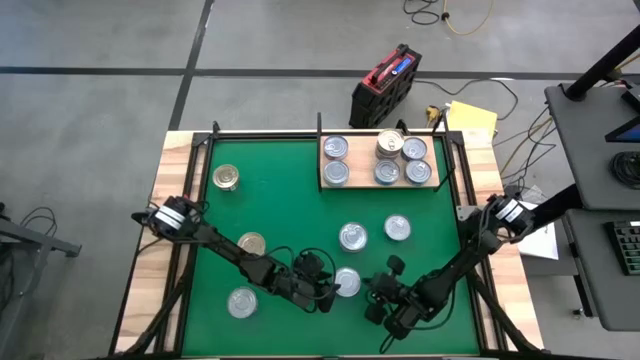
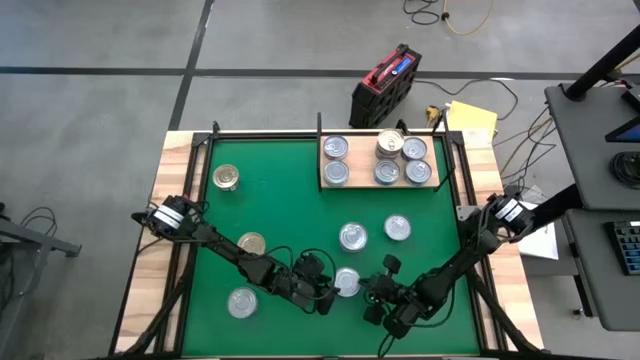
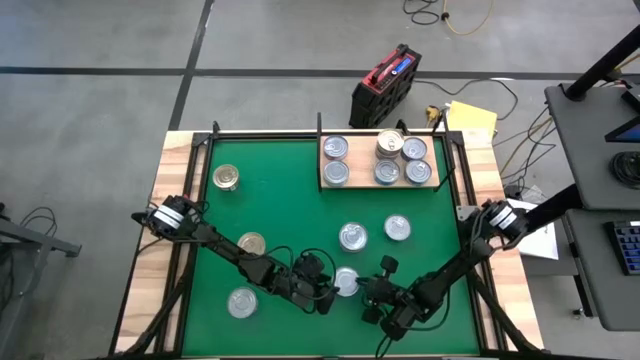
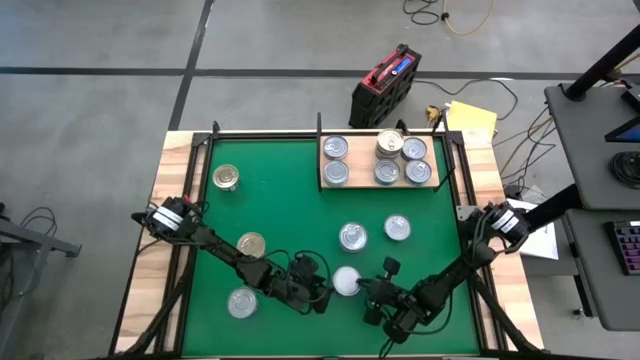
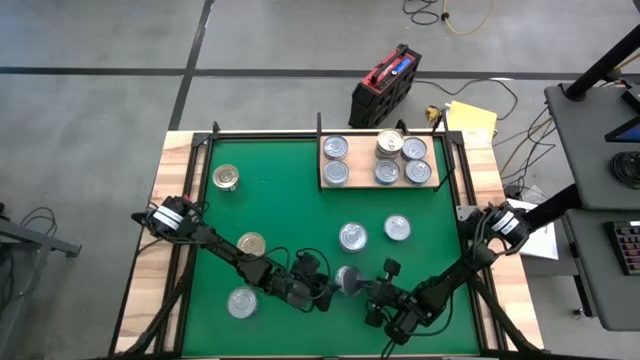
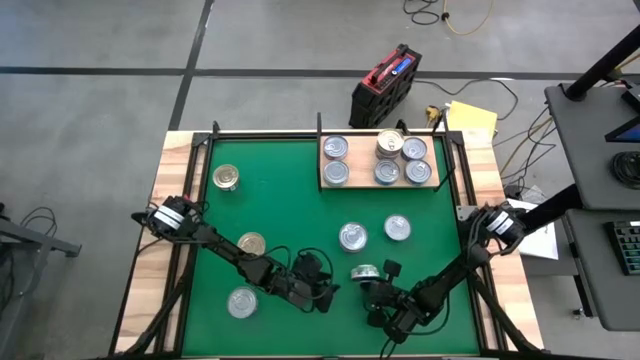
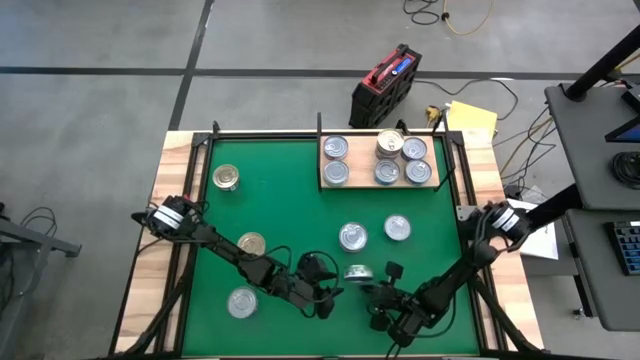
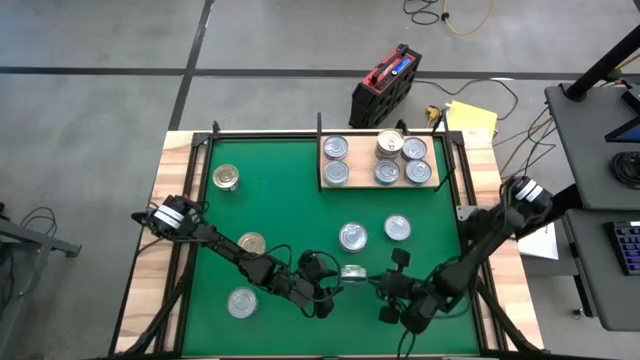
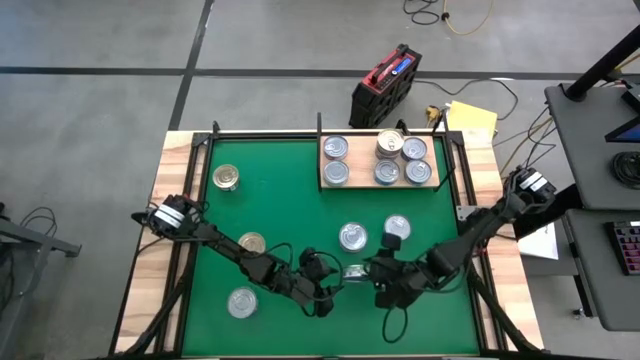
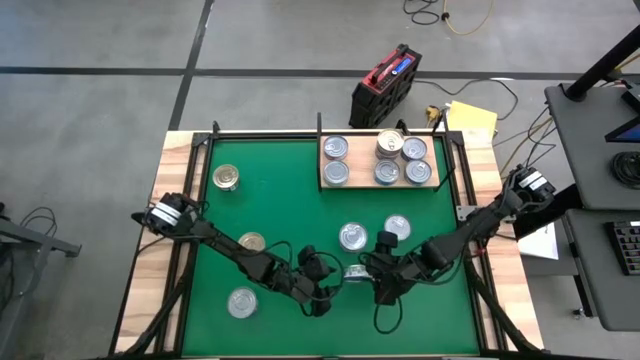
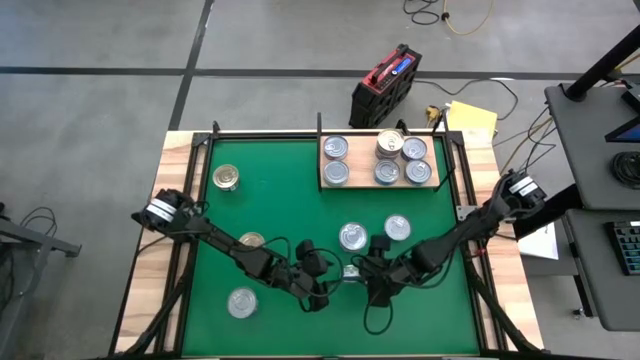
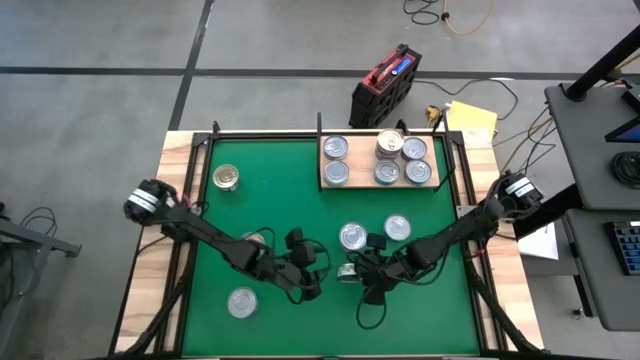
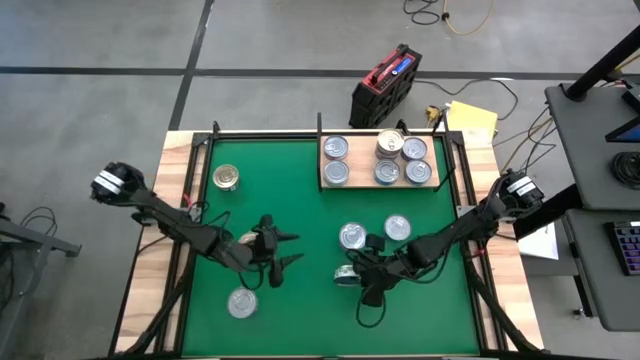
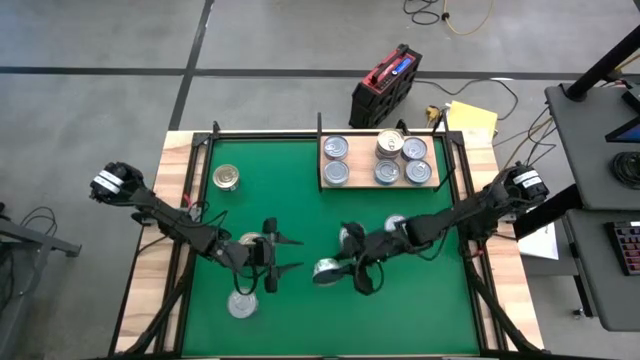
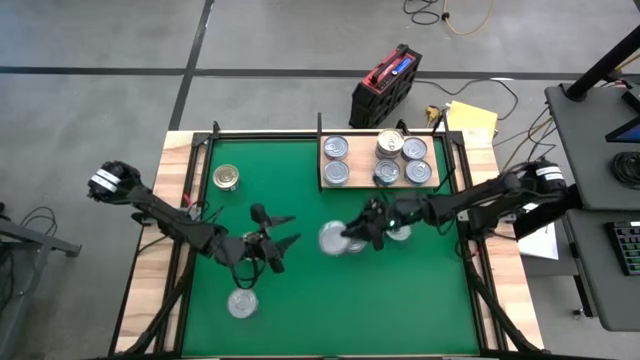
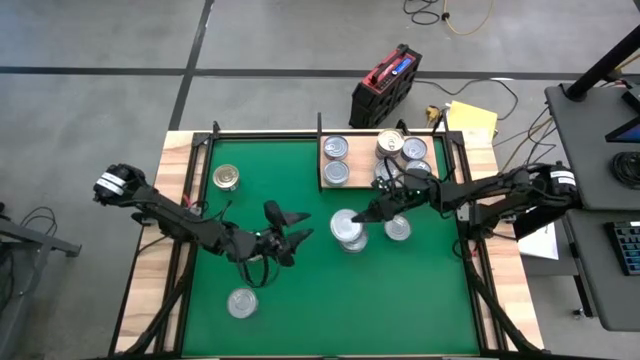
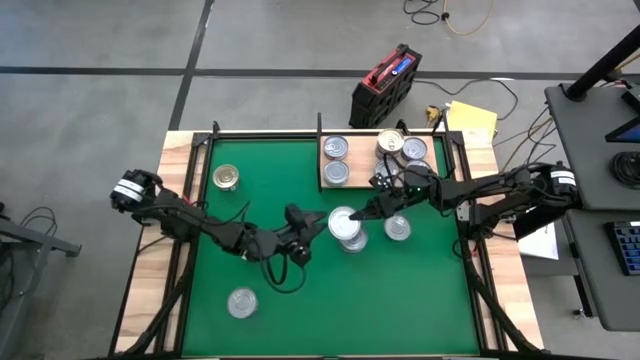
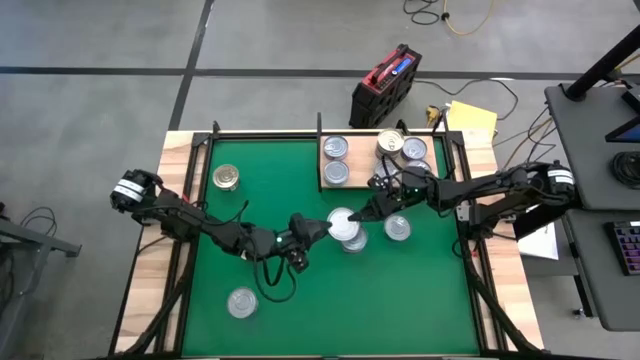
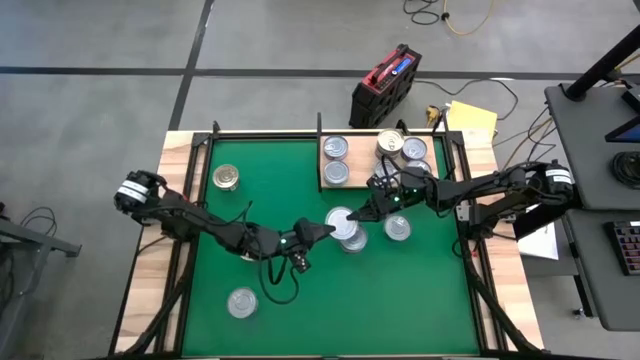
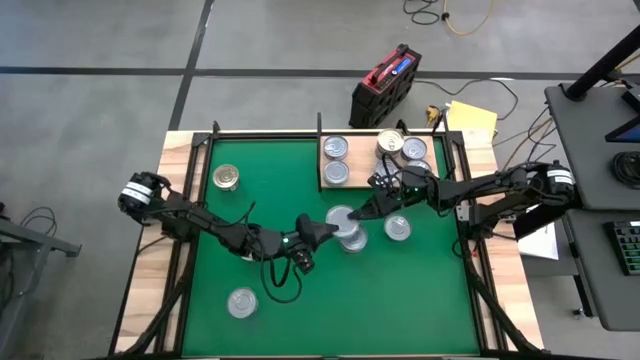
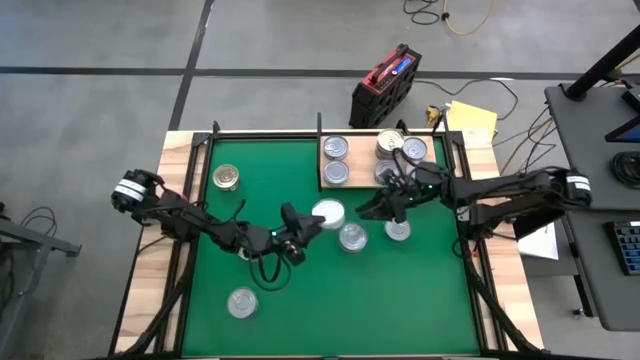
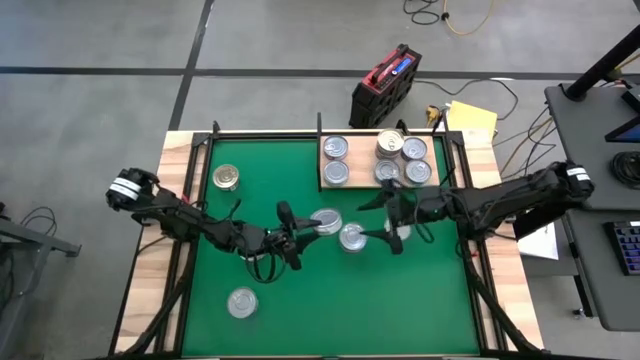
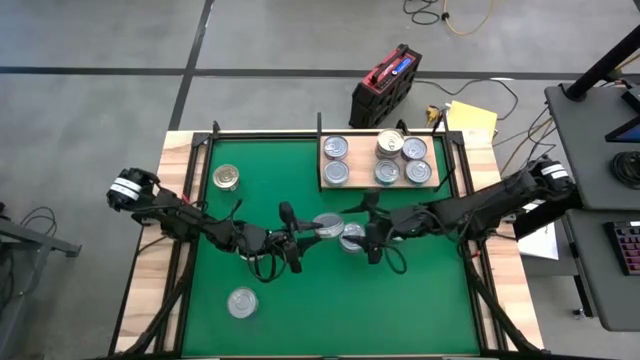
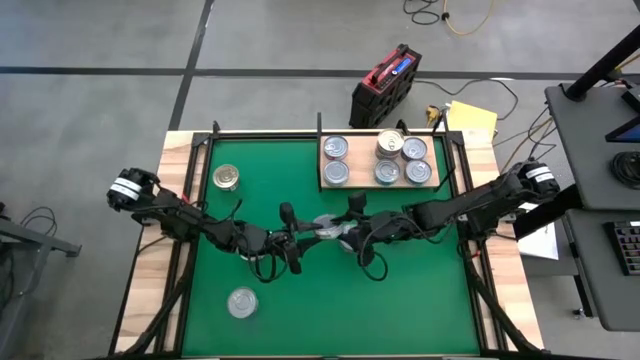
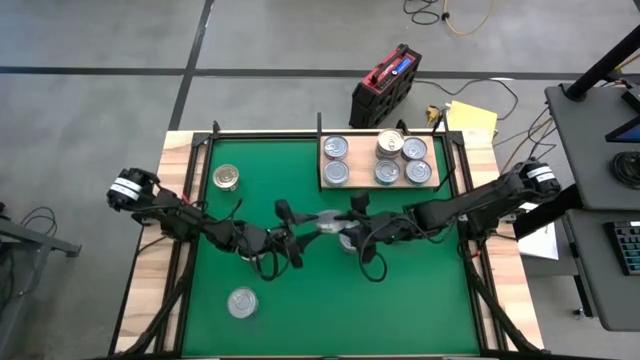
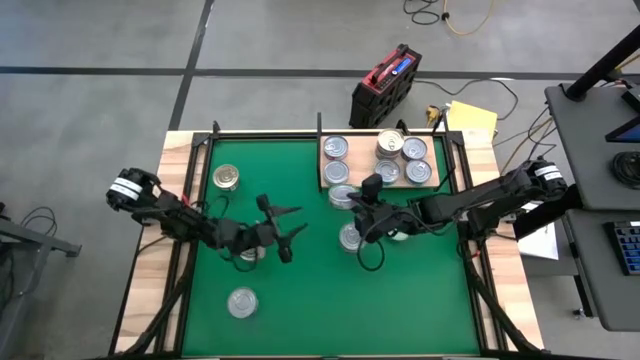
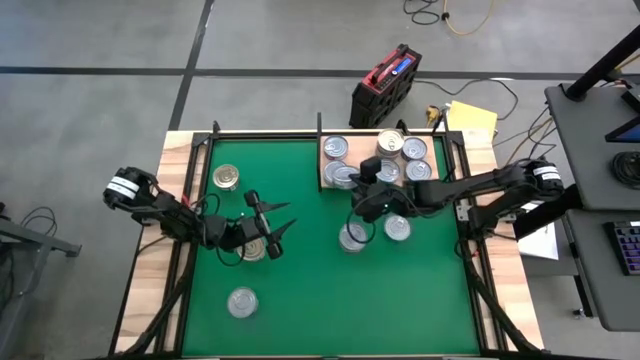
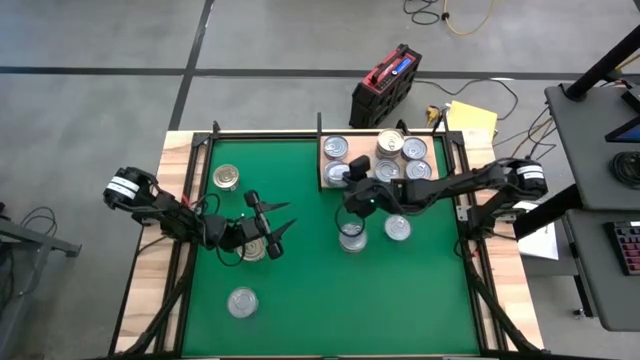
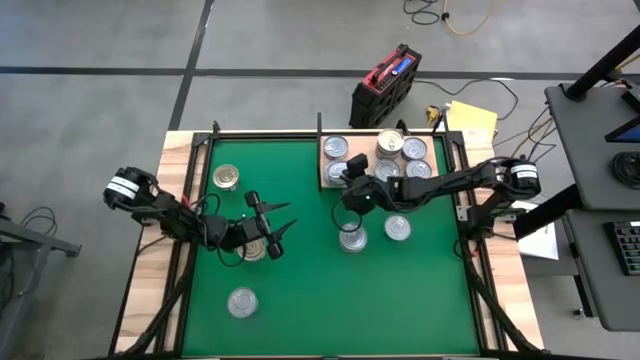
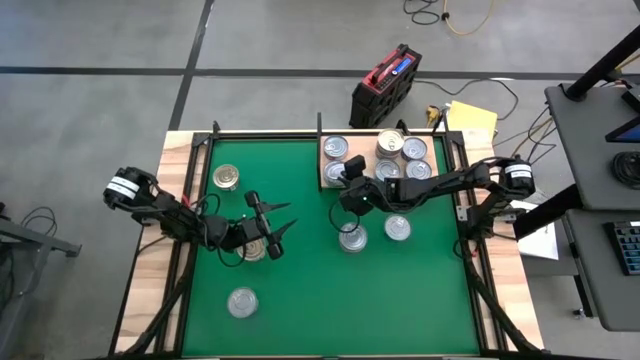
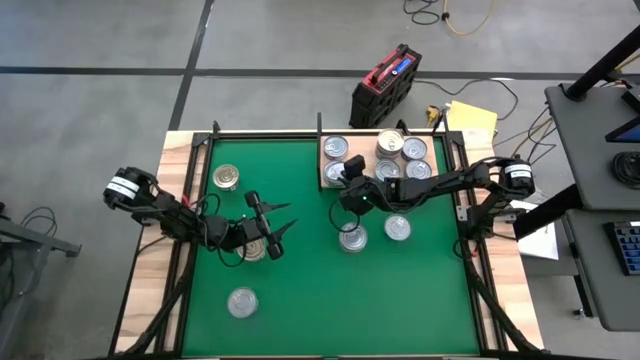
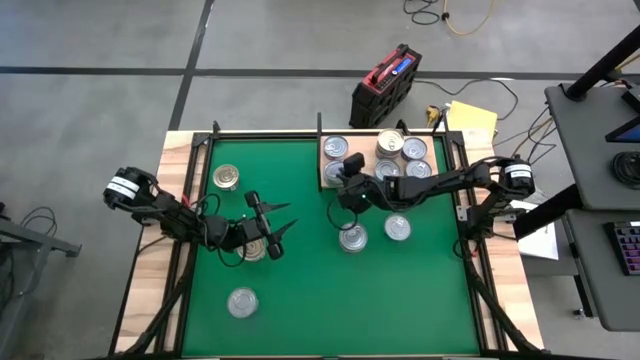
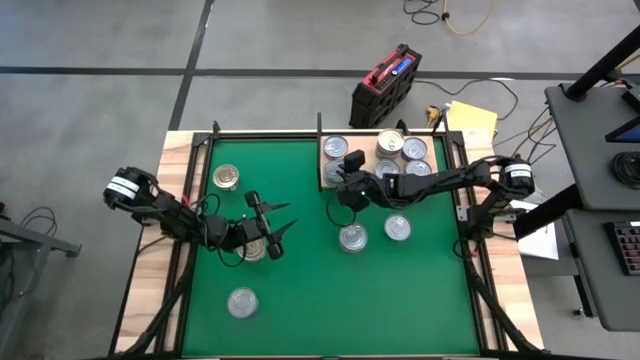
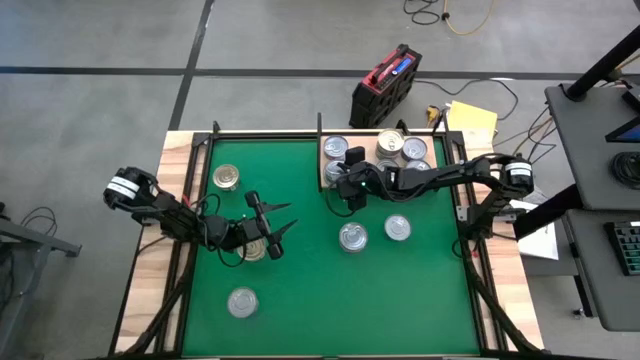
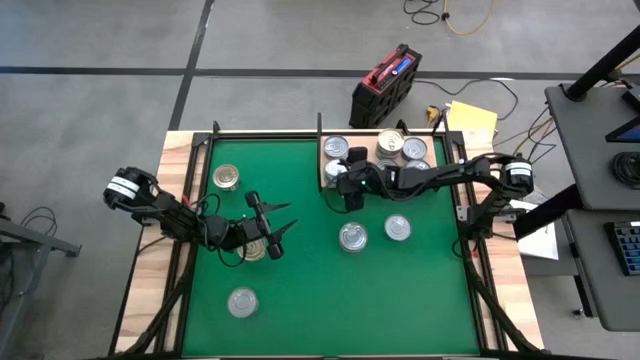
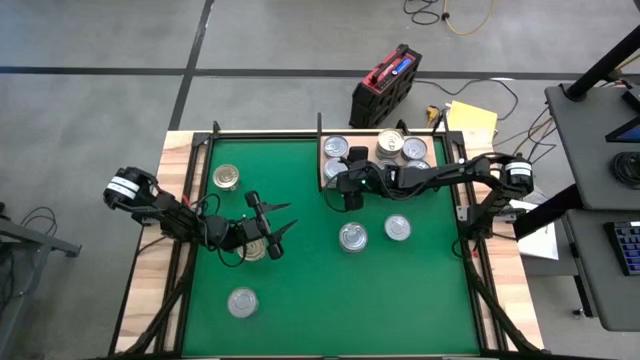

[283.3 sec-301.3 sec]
Task: Stack canned seafood by type on shelf
Stack the green tuna can on top of the green tuna can on the shelf

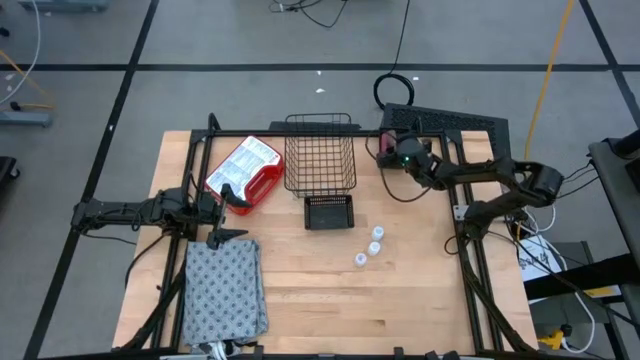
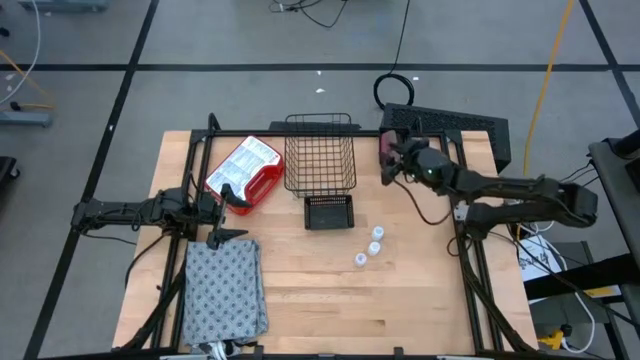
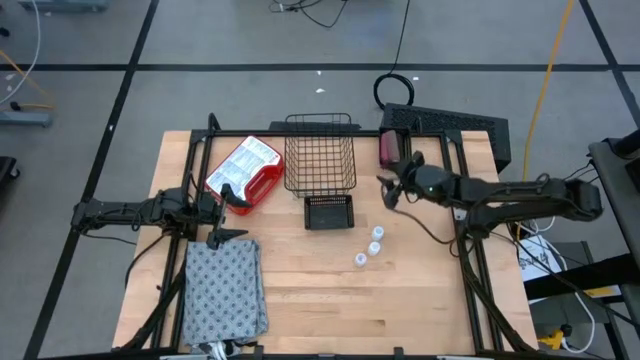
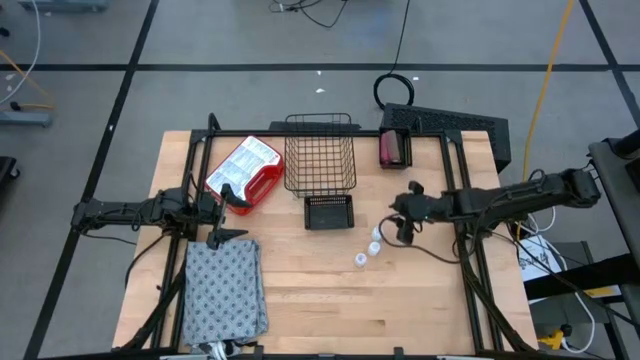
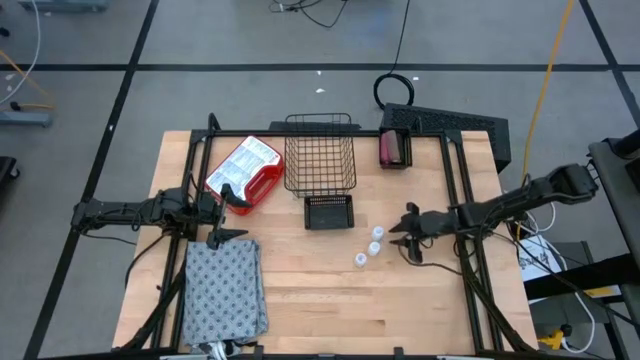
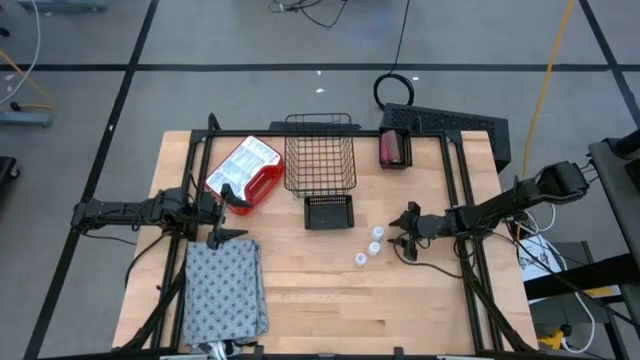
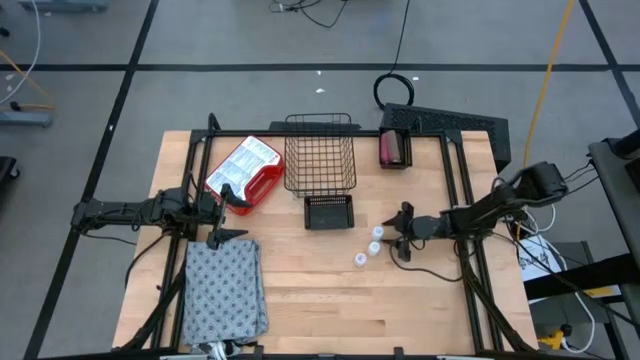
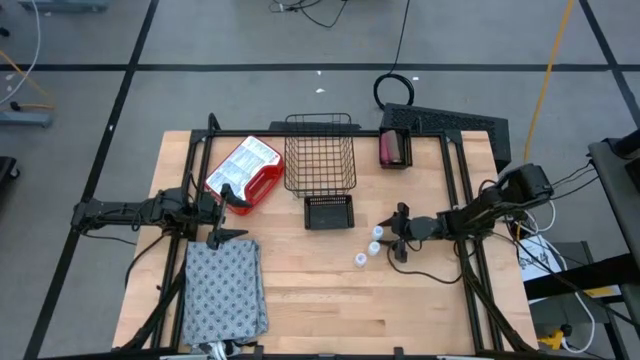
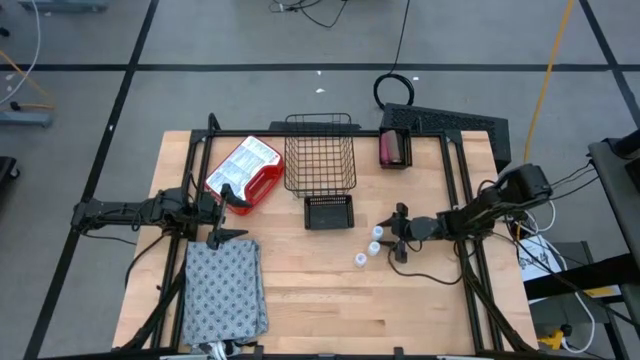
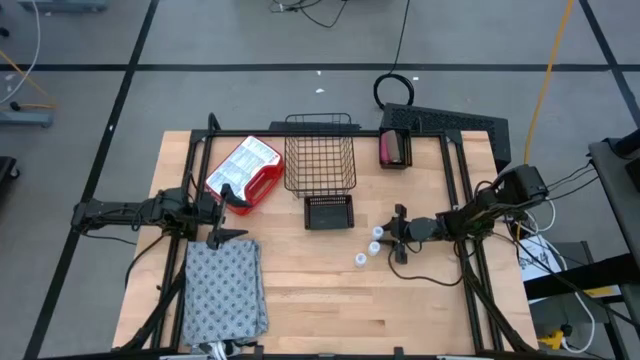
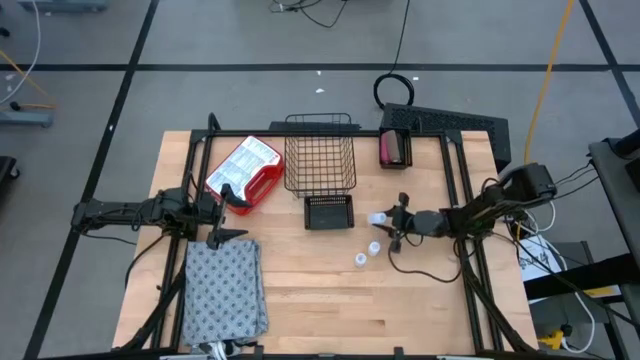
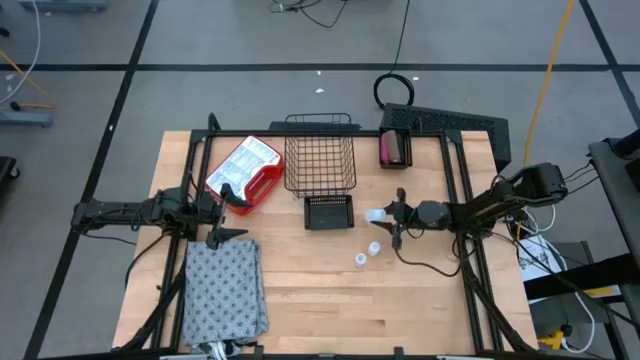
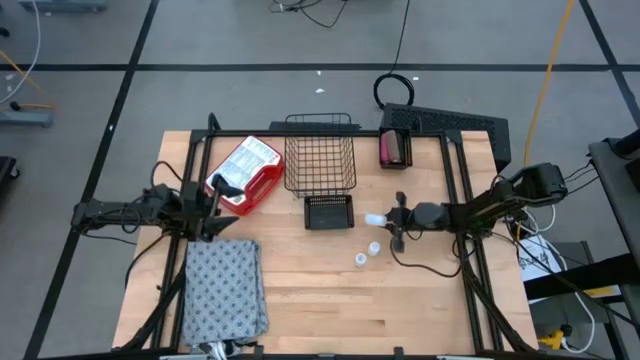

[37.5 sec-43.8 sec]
Task: Pick & place medical supplies in basket/bin
Put the top white pill bottle into the bottom black bin
